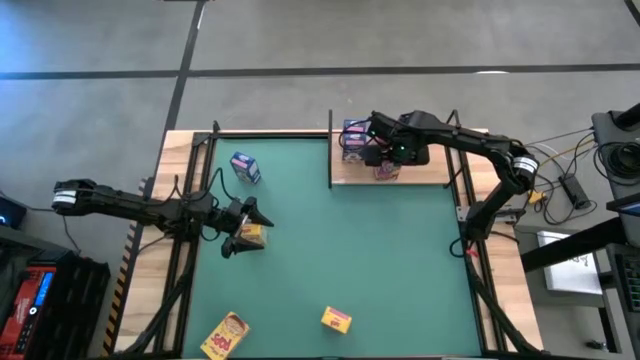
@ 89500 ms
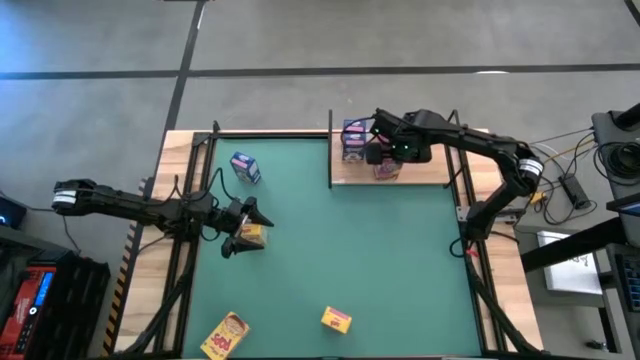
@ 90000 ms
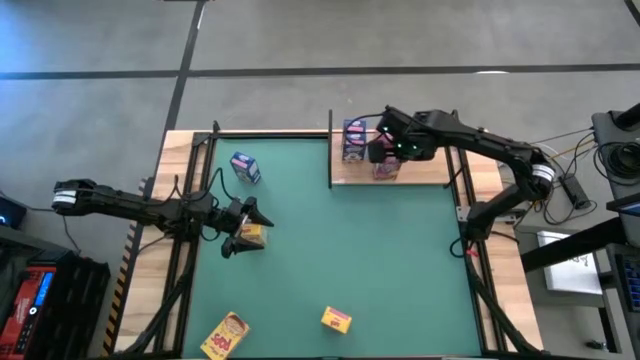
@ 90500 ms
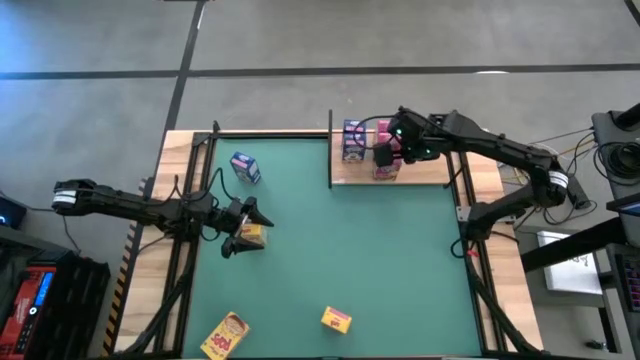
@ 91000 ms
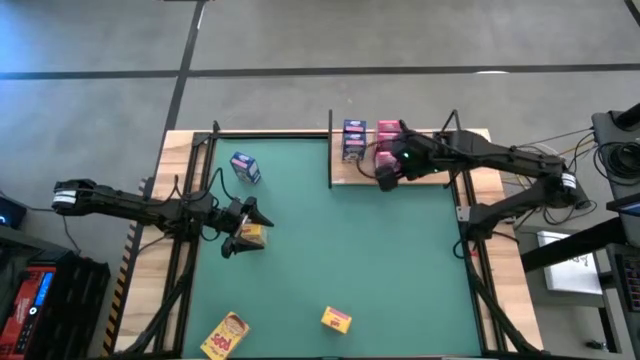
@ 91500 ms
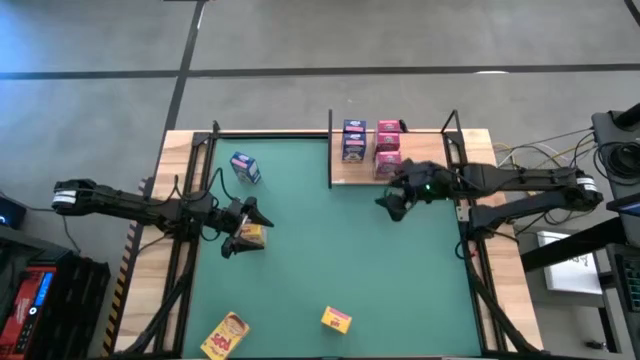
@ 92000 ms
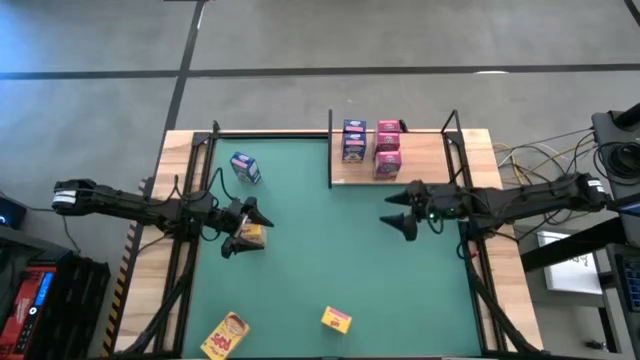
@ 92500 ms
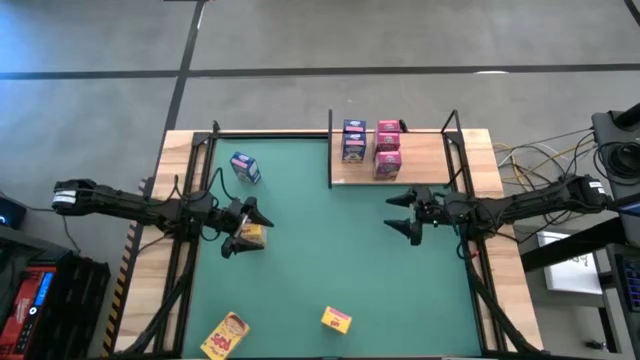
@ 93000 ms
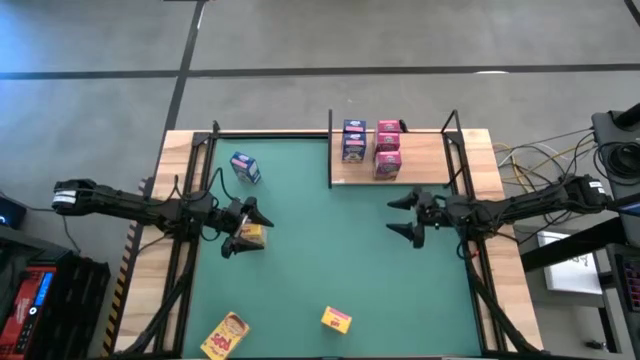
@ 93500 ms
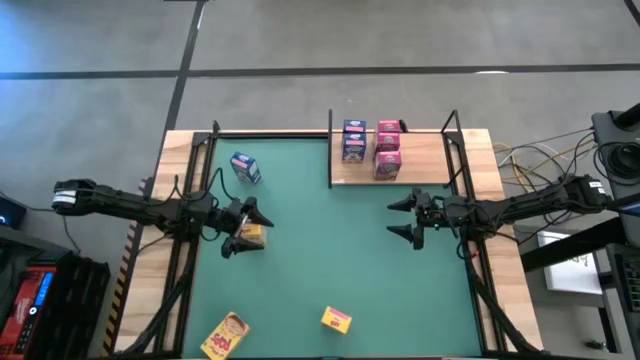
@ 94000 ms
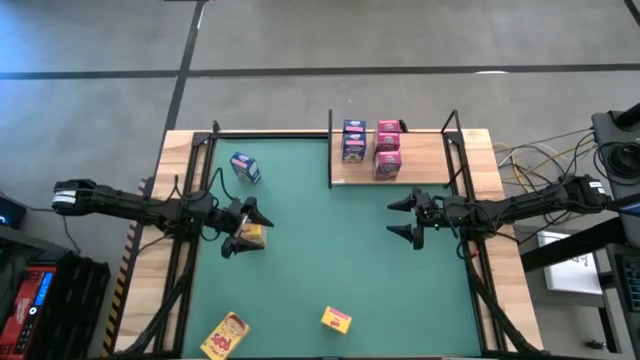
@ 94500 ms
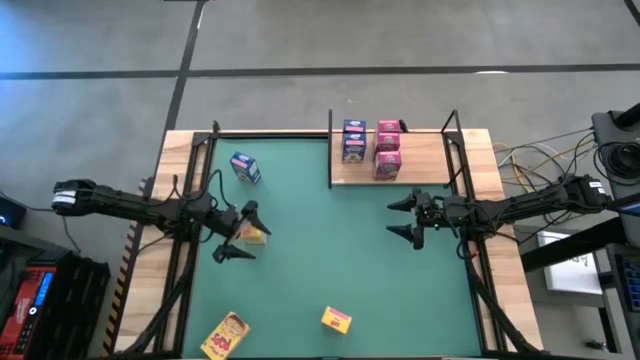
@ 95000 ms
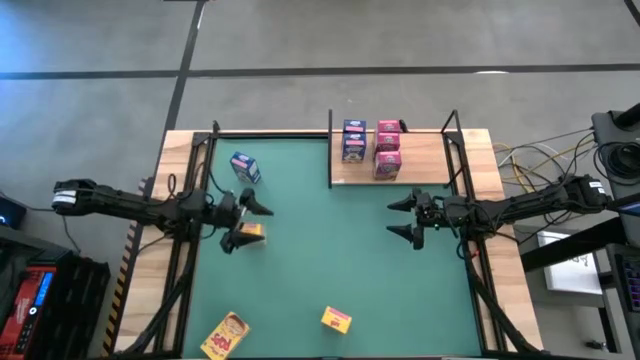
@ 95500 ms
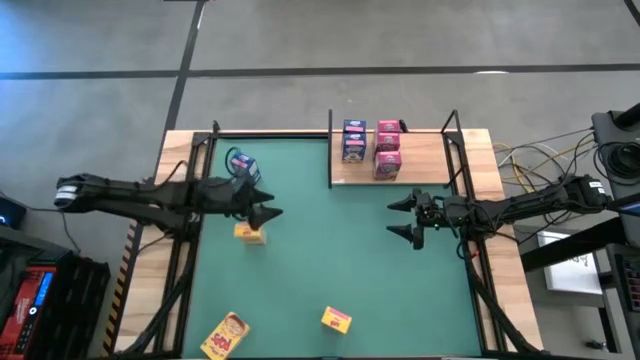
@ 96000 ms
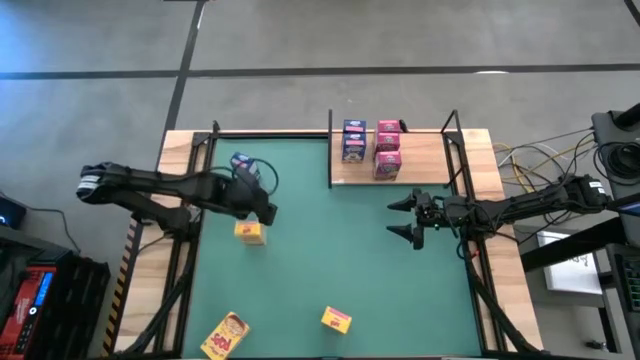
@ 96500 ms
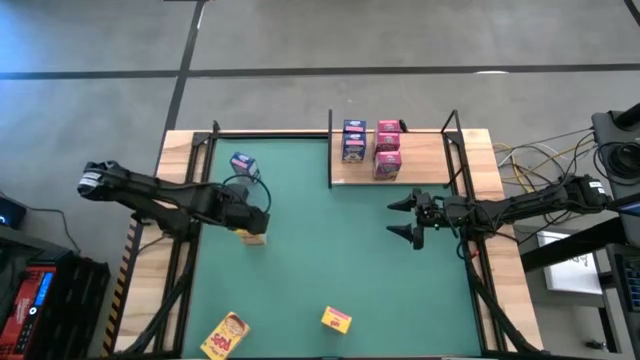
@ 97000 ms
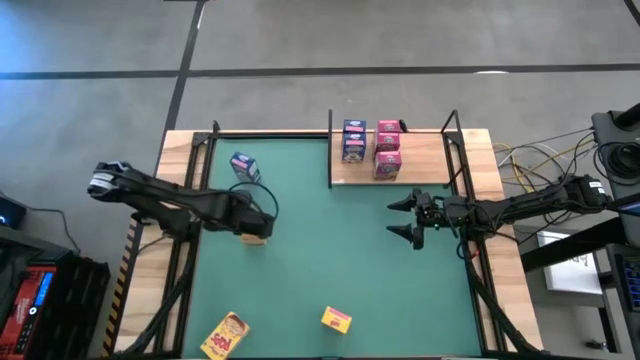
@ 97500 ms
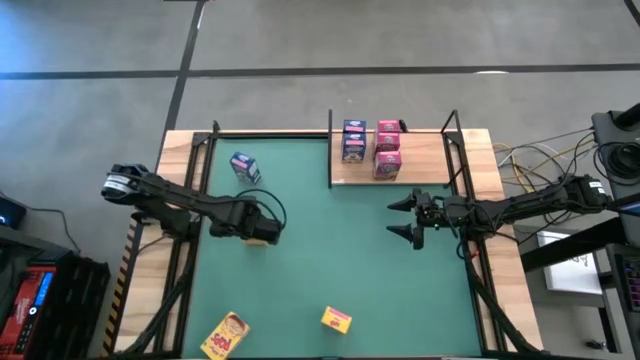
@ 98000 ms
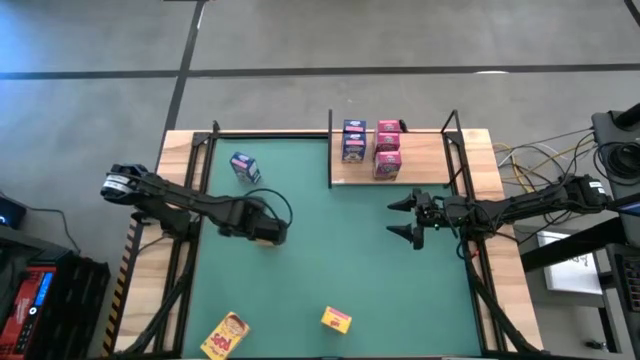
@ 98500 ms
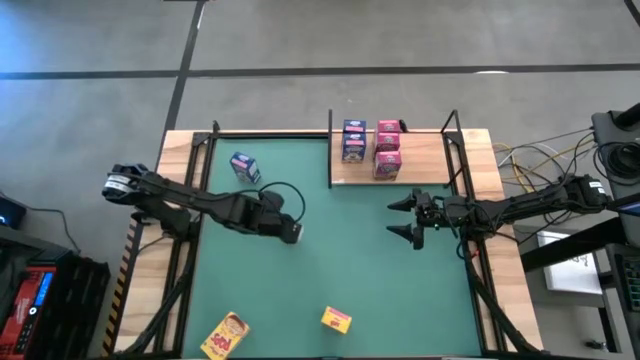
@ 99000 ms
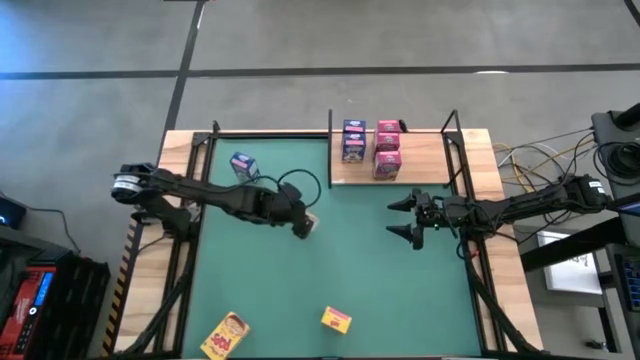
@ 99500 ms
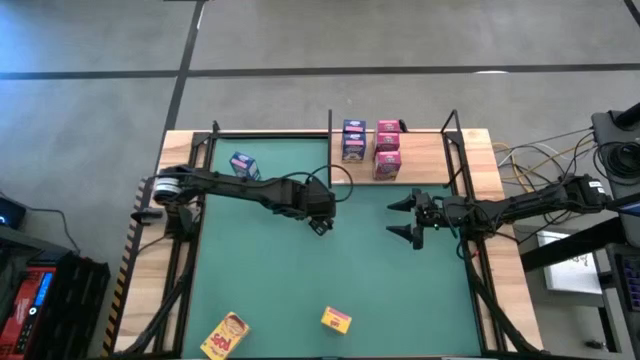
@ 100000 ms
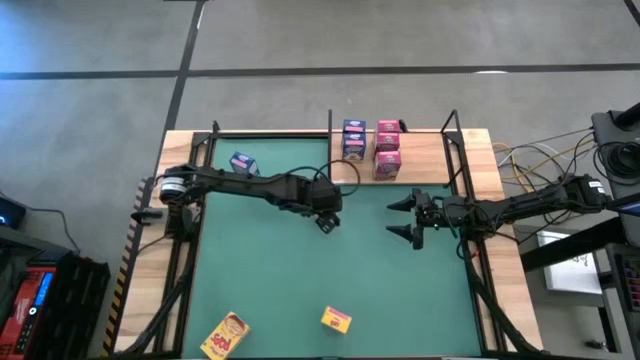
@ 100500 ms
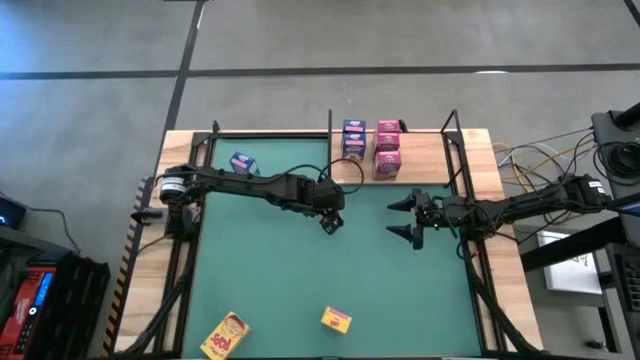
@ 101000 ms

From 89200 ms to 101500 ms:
Task: Stack cereal on shelf
Move the middle left yellow cereal box to the center

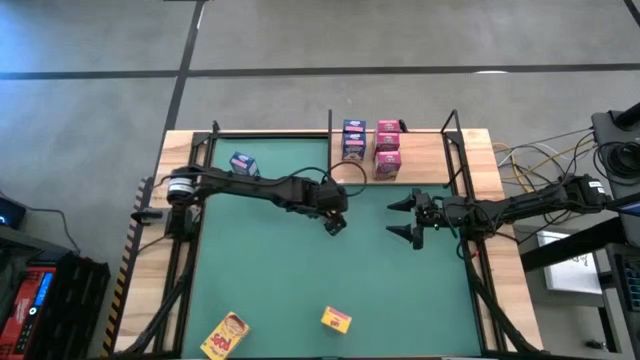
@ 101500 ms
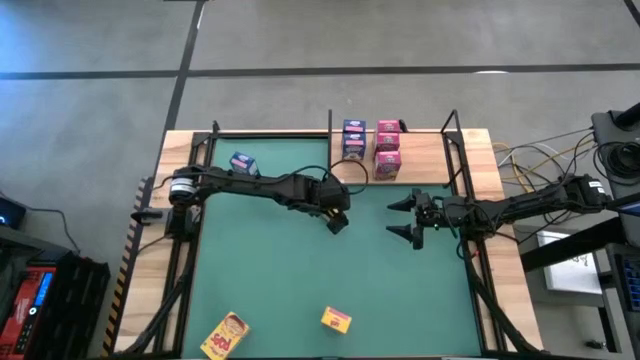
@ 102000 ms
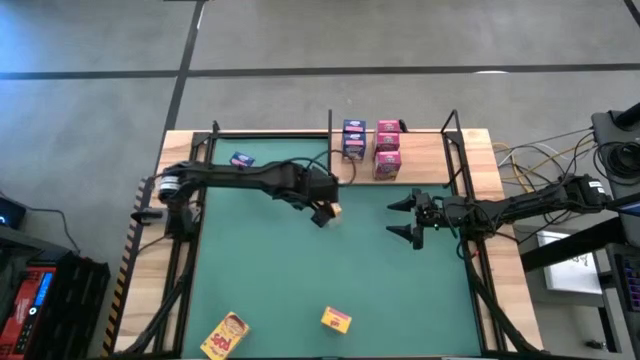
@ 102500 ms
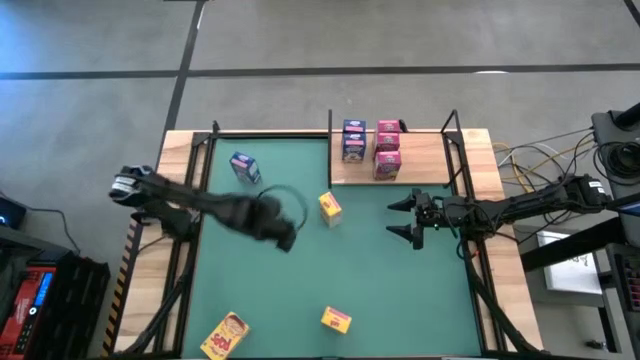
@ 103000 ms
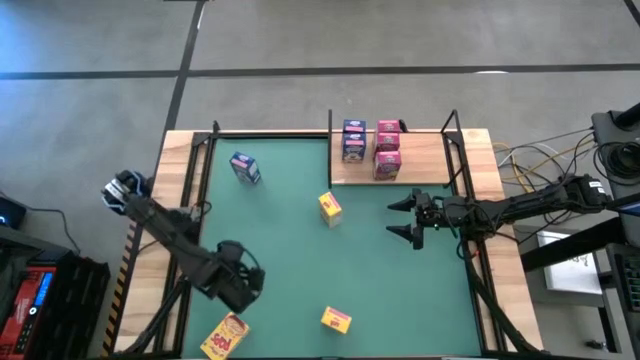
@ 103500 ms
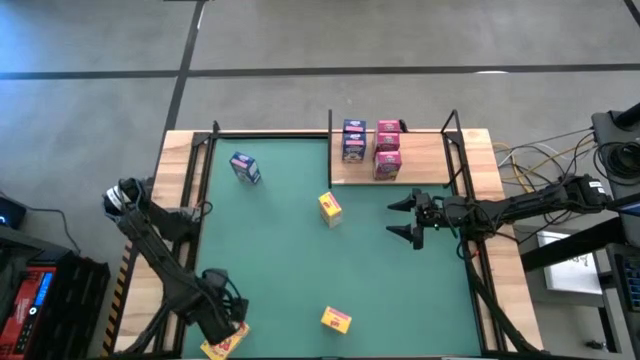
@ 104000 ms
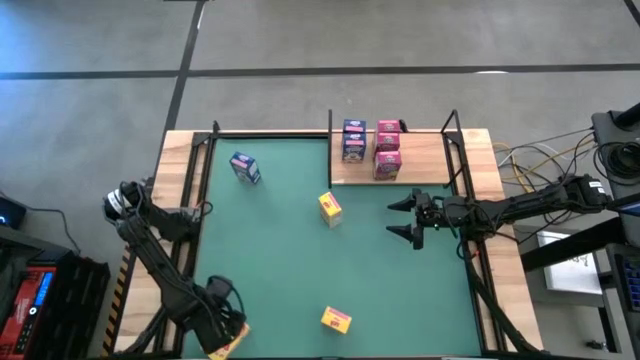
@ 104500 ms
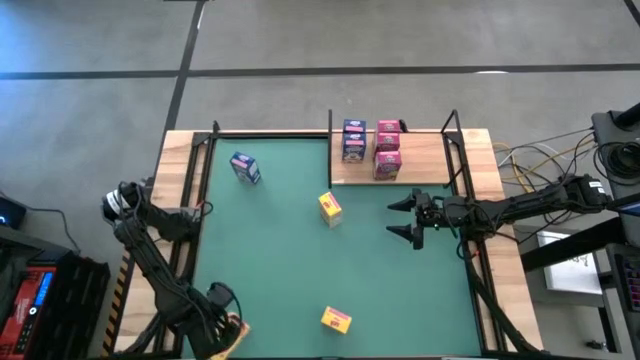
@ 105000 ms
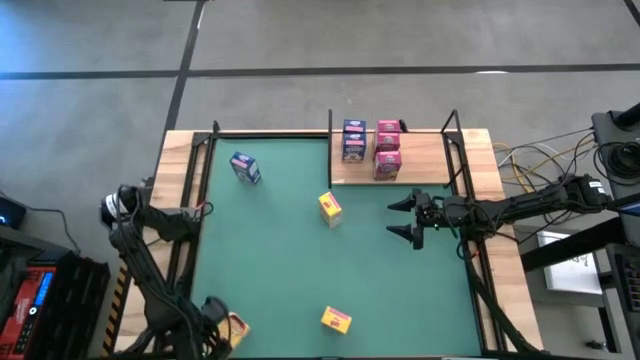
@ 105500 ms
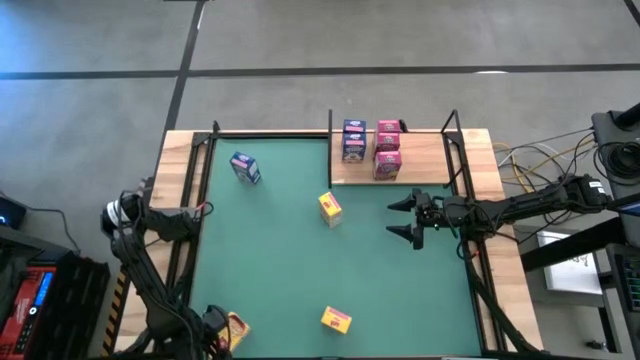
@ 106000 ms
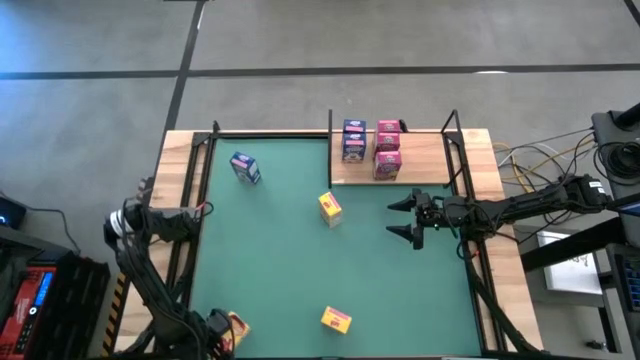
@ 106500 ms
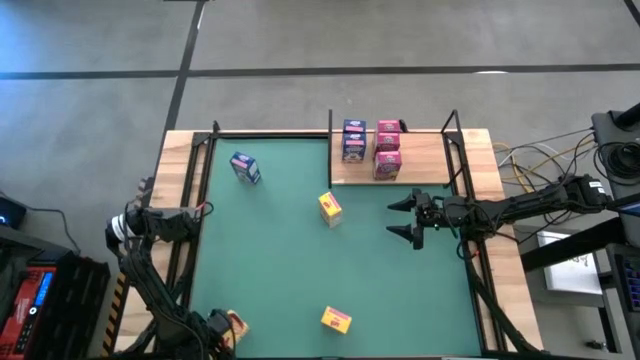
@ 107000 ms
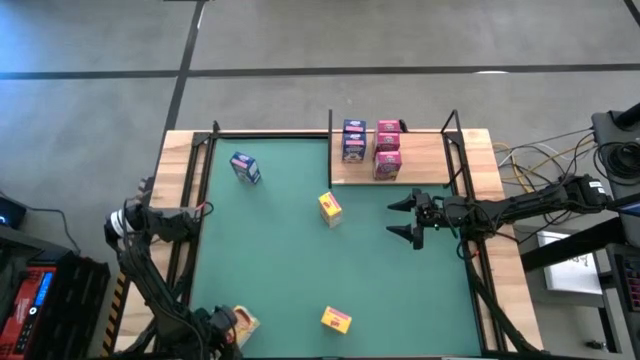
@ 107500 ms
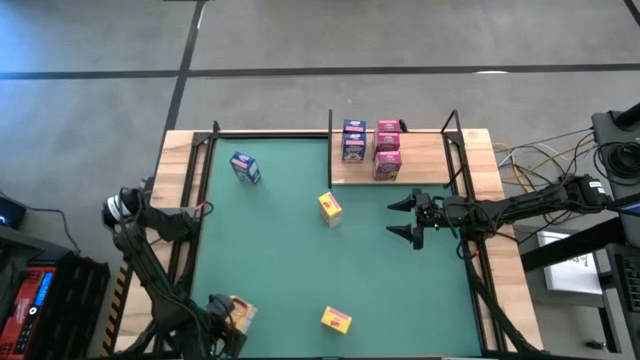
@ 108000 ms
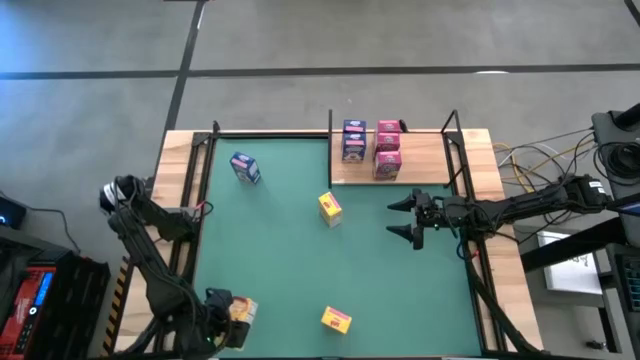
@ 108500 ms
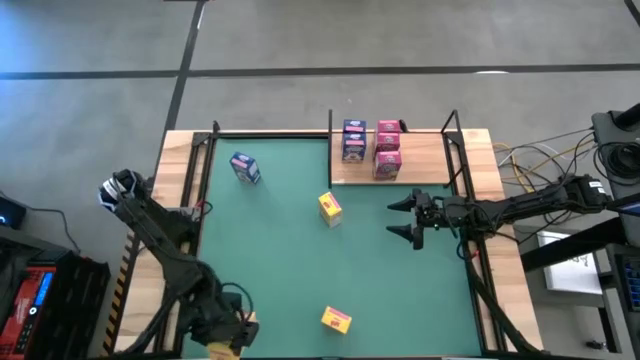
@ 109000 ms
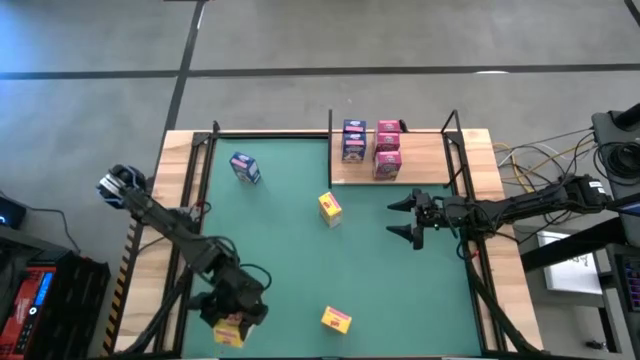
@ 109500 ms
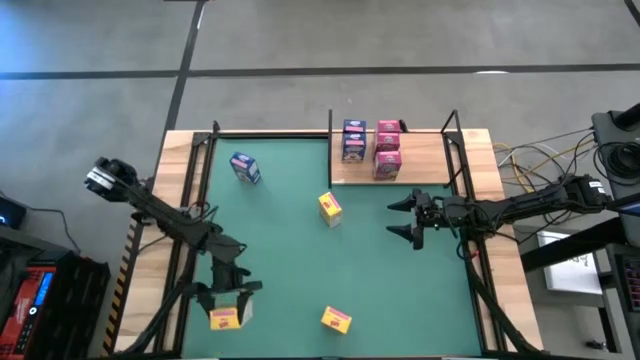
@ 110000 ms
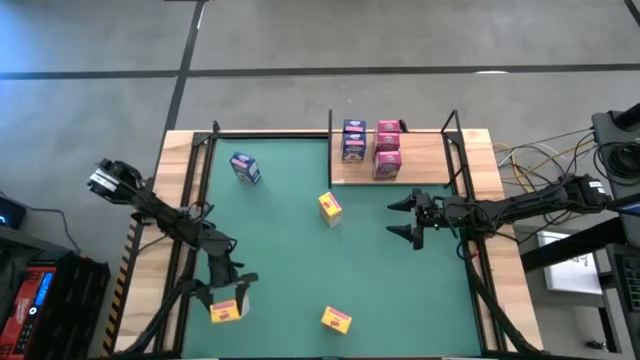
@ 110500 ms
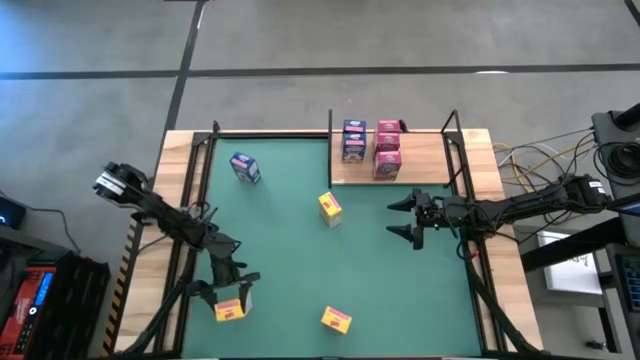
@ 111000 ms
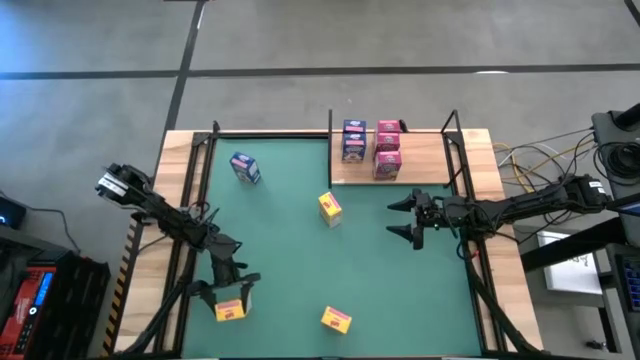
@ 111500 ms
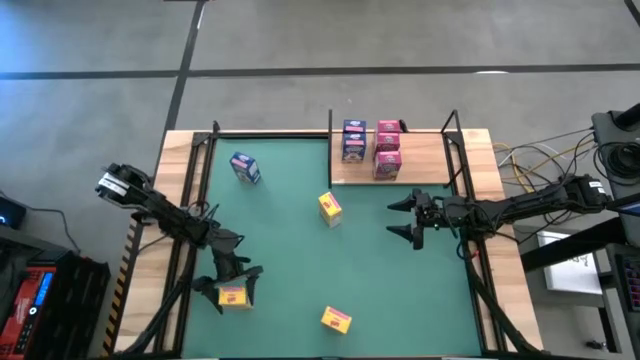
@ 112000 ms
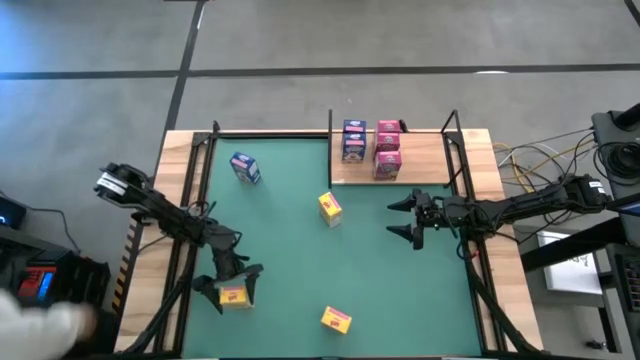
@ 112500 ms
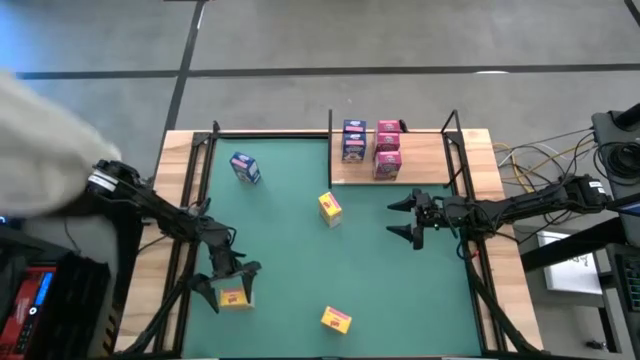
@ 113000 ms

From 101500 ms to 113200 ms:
Adjust the bottom left yellow cereal box
